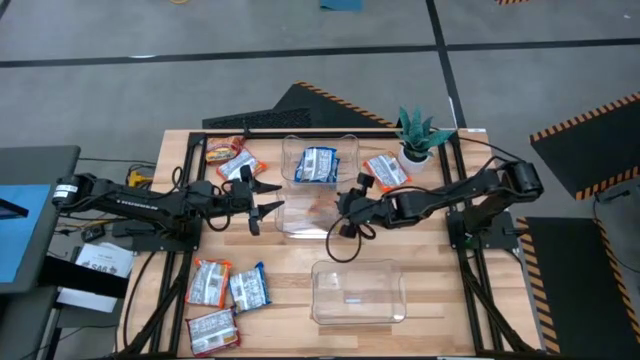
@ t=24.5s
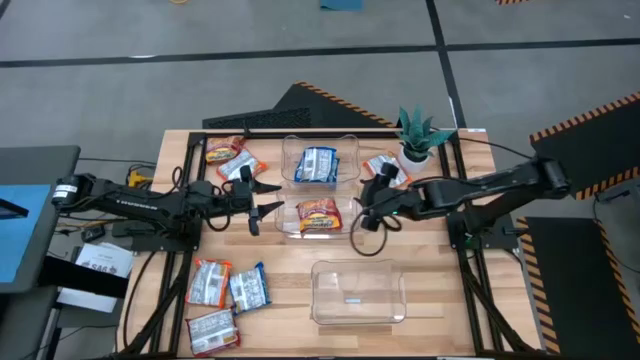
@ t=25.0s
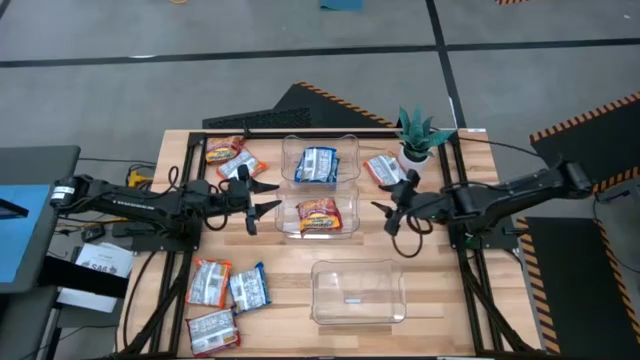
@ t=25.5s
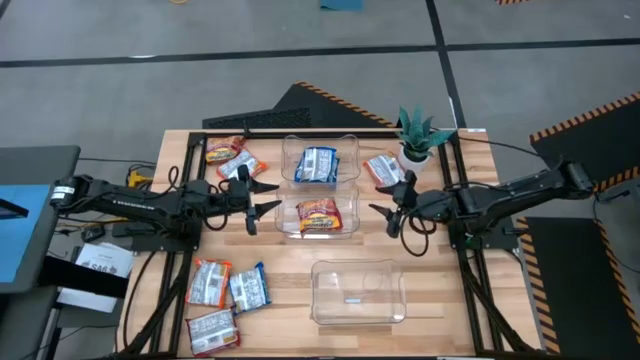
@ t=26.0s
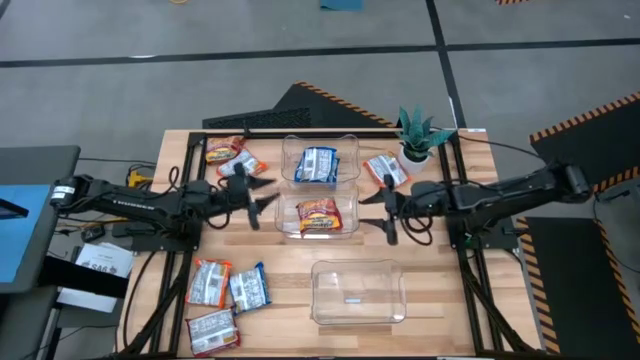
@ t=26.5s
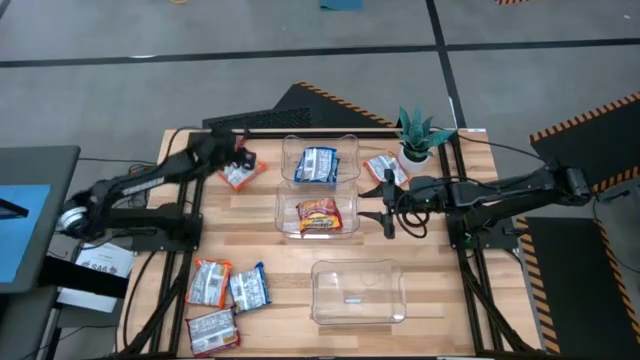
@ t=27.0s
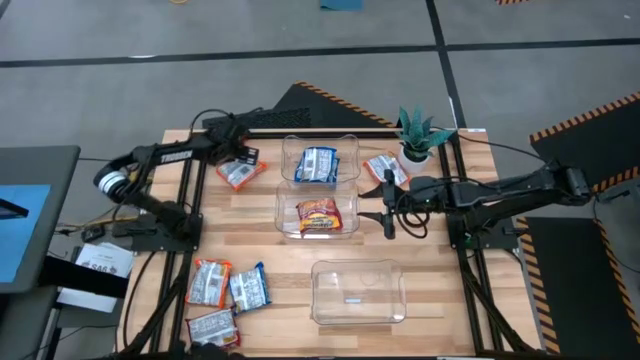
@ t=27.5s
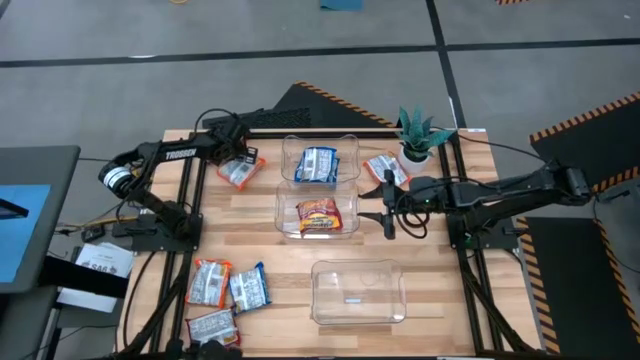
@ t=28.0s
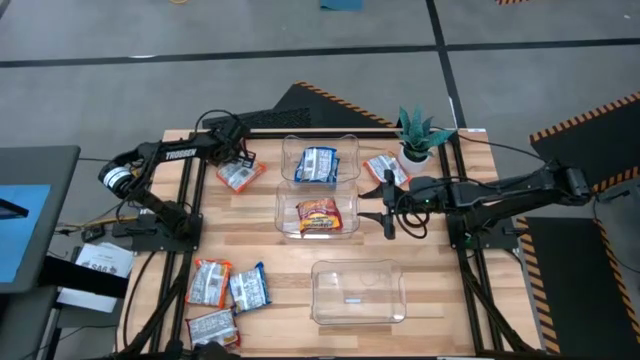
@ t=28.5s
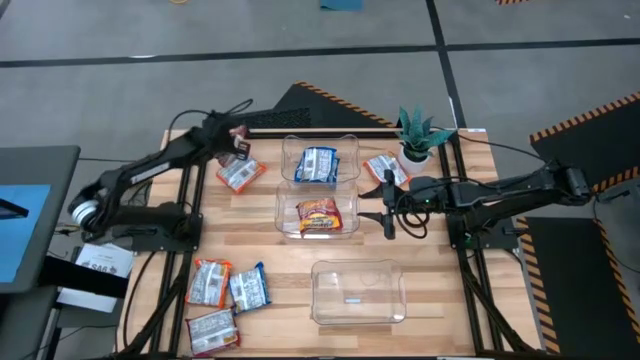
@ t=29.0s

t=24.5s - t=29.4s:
Task: Sort Maruchan noodles
Put the top red noodle pack into the middle transparent bin

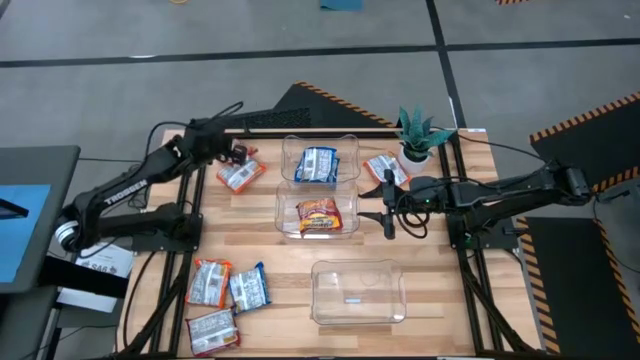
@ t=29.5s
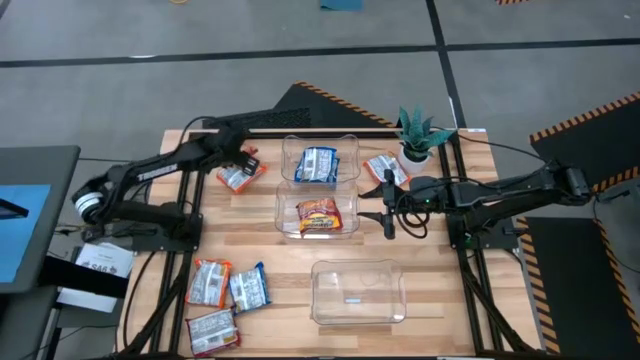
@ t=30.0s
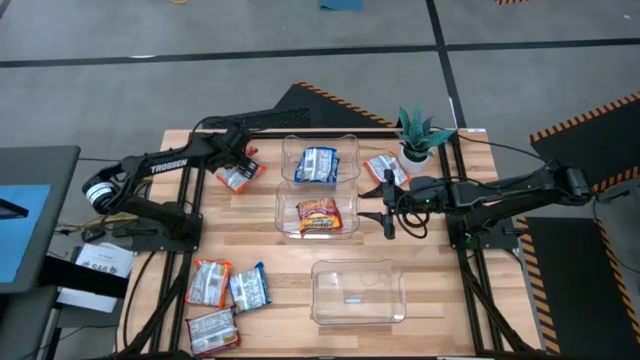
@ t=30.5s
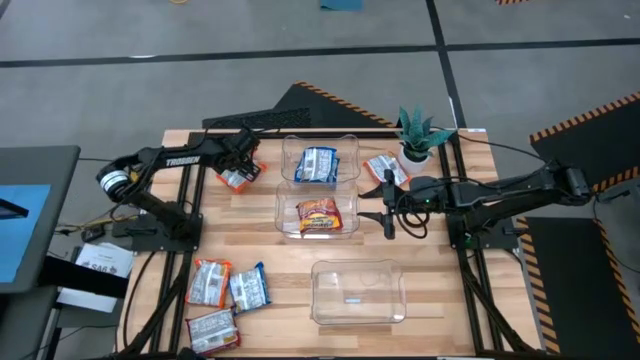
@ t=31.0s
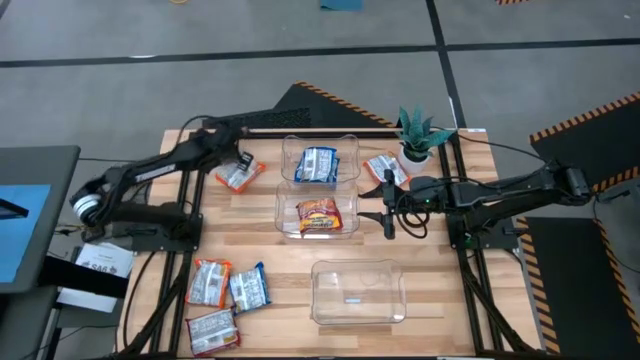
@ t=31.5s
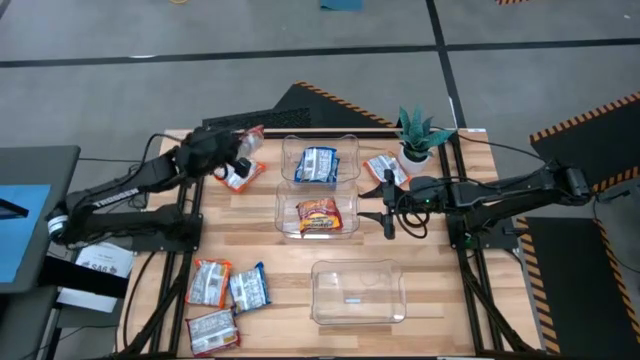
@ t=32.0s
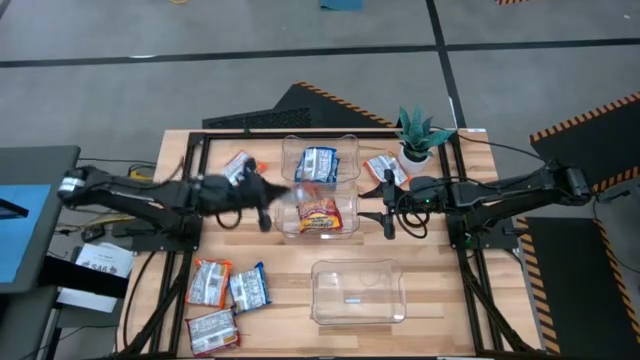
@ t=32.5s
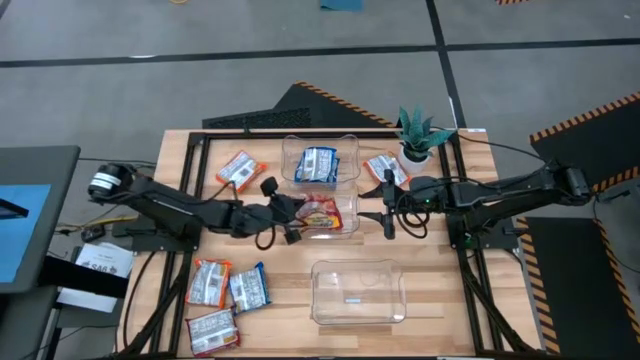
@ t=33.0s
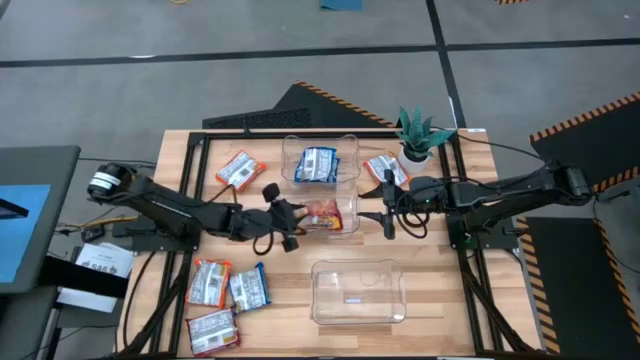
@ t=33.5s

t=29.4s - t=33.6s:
Put the top red noodle pack into the middle transparent bin

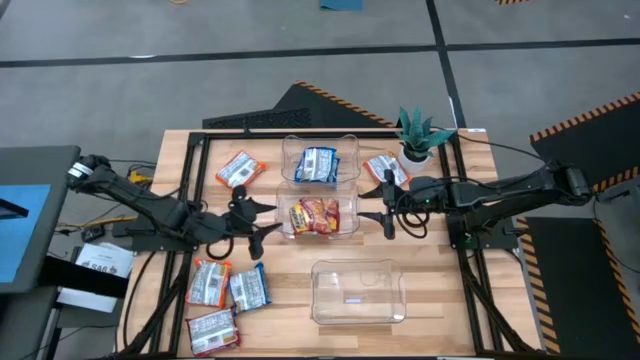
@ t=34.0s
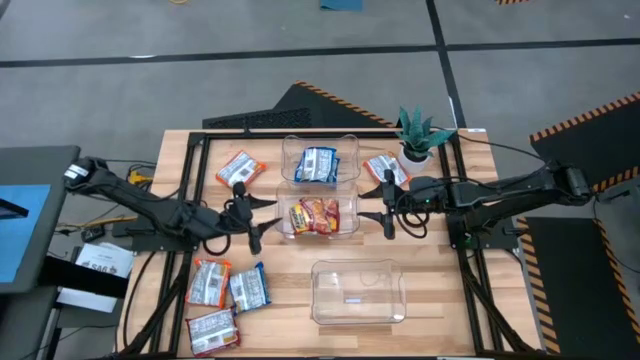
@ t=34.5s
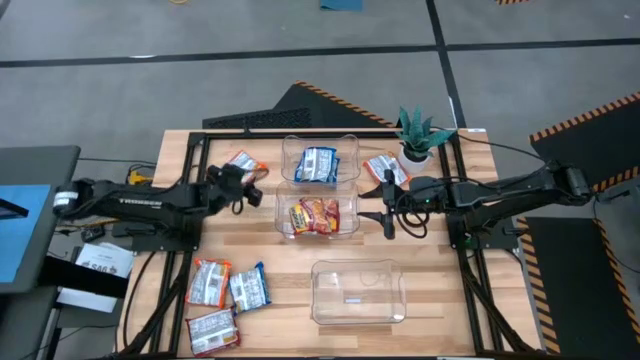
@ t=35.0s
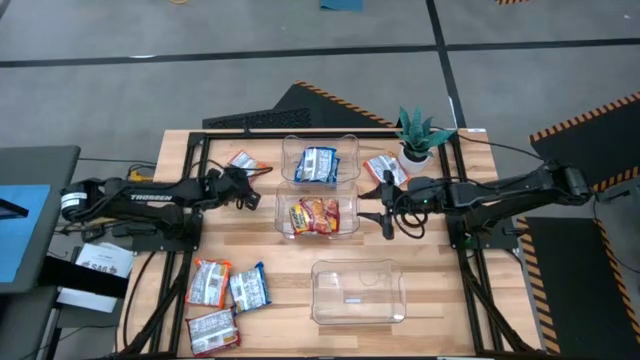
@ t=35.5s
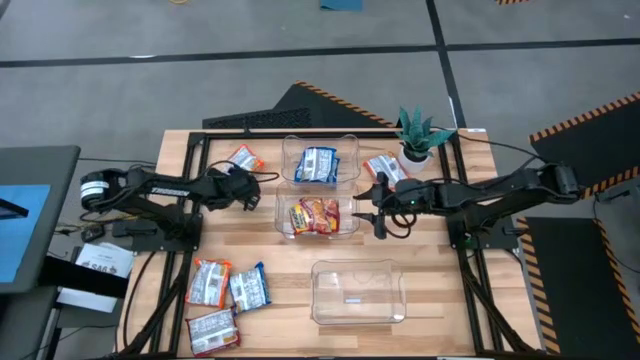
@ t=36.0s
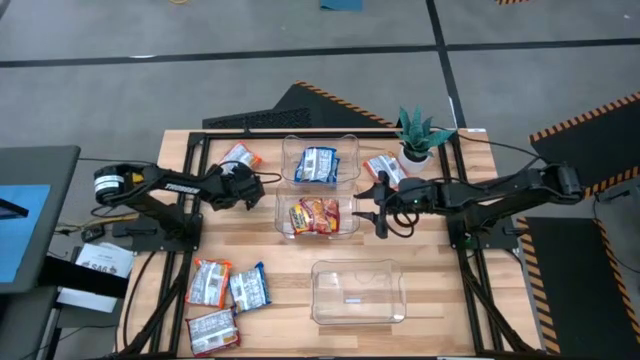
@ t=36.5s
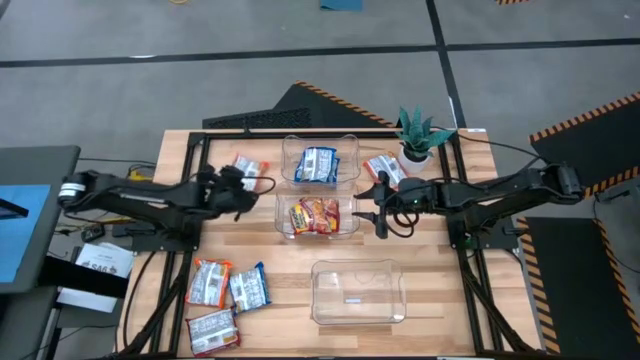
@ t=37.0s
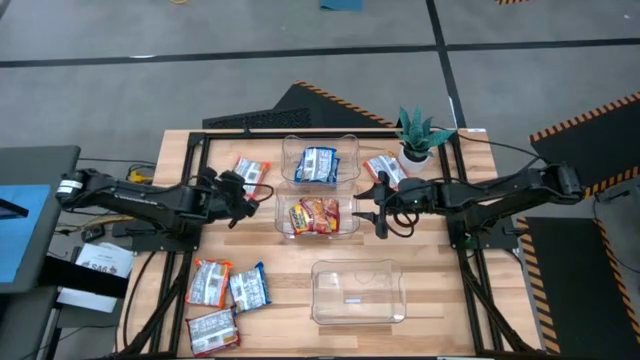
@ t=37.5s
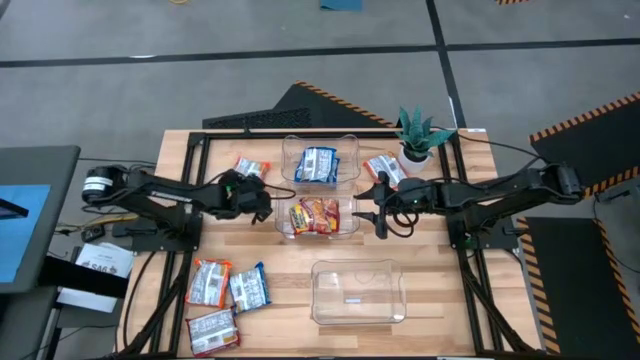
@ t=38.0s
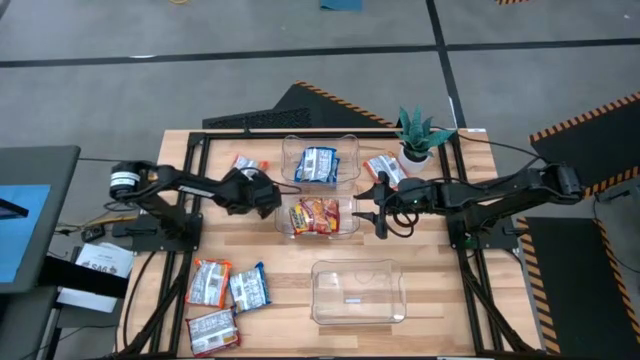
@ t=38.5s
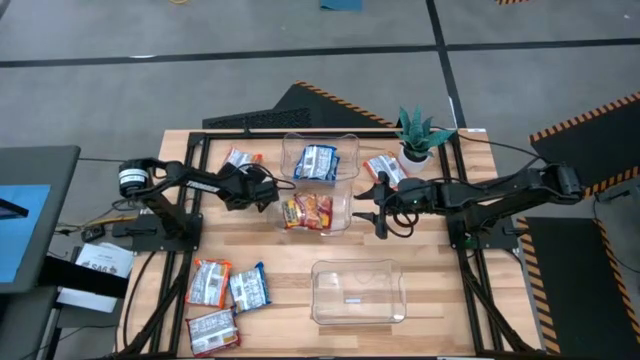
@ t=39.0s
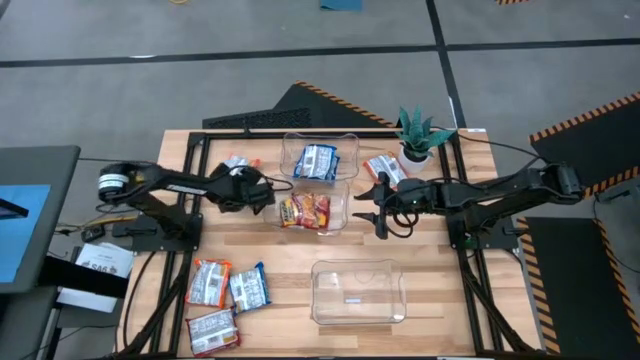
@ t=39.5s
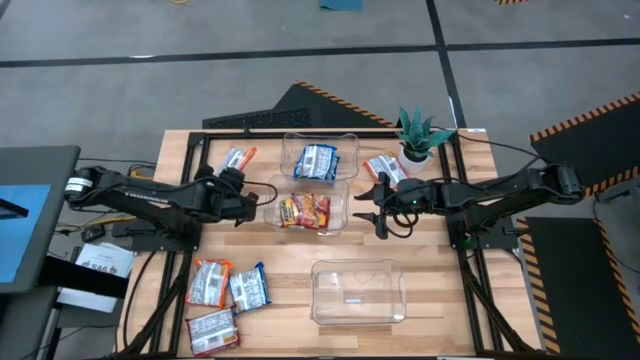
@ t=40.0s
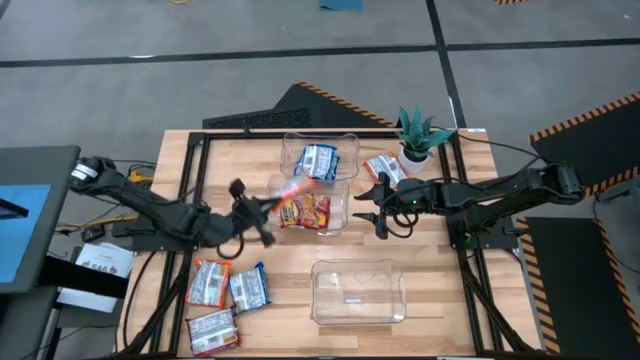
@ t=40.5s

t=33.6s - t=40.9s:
Put the top left orange noodle pack into the bottom transparent bin

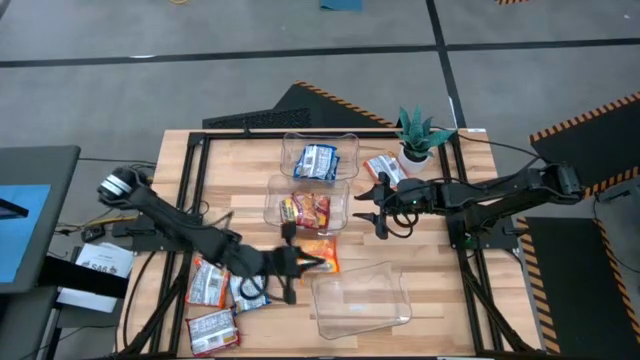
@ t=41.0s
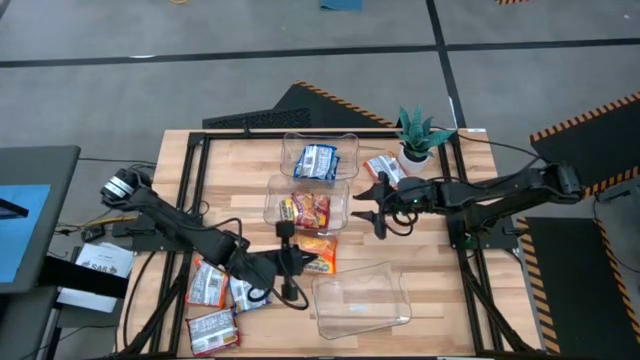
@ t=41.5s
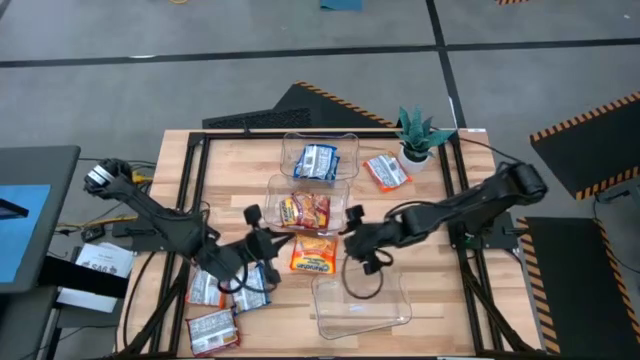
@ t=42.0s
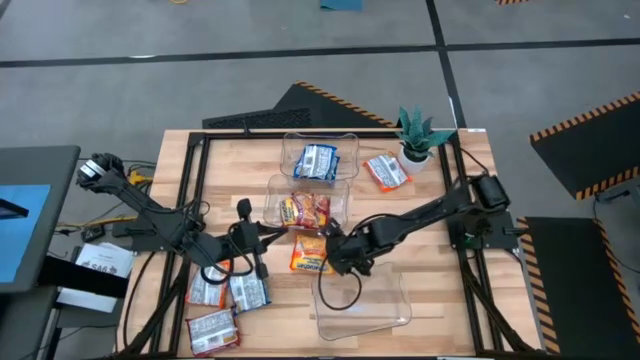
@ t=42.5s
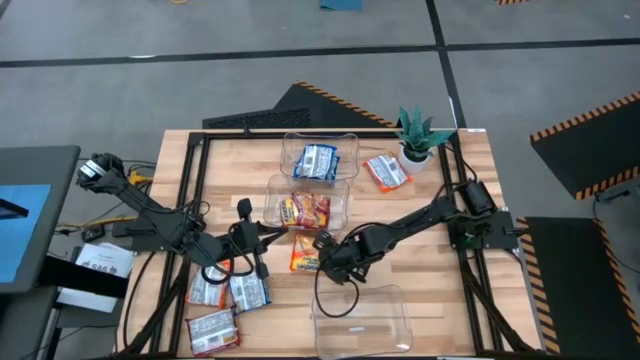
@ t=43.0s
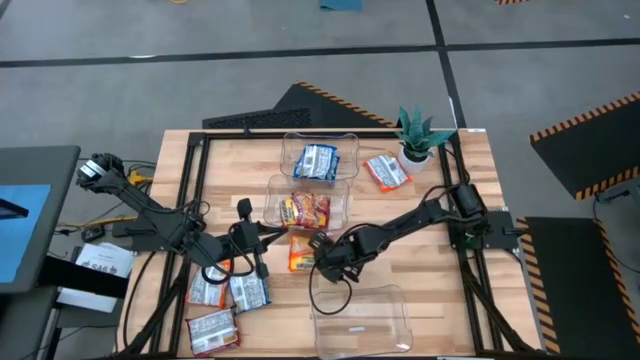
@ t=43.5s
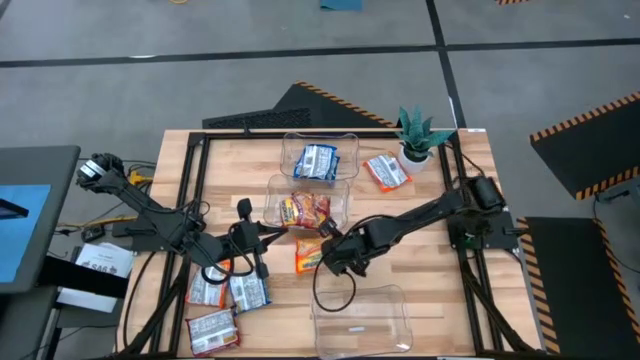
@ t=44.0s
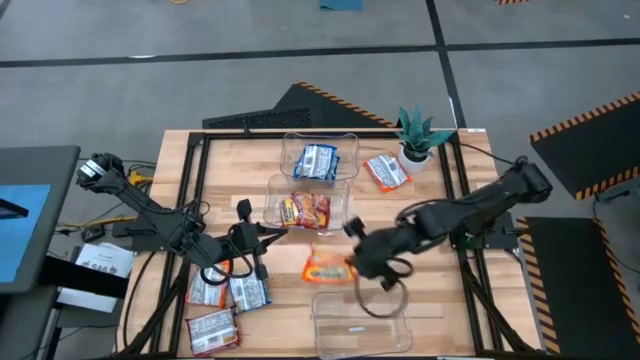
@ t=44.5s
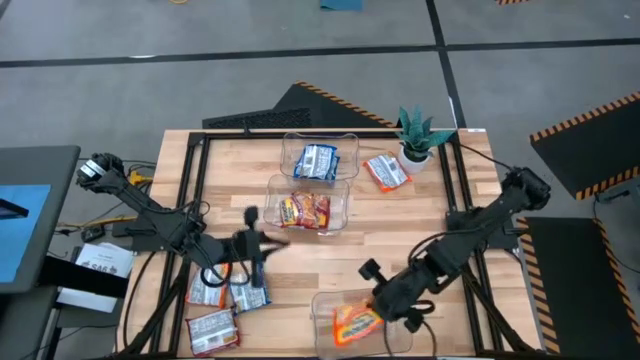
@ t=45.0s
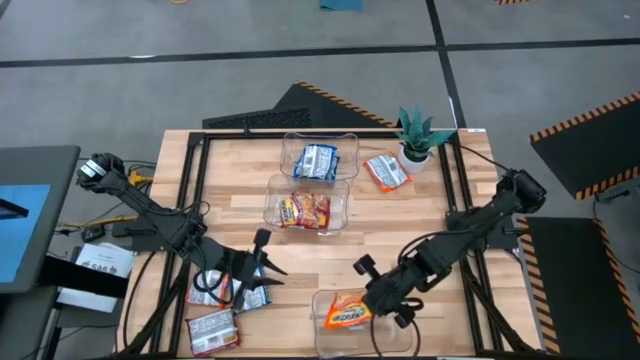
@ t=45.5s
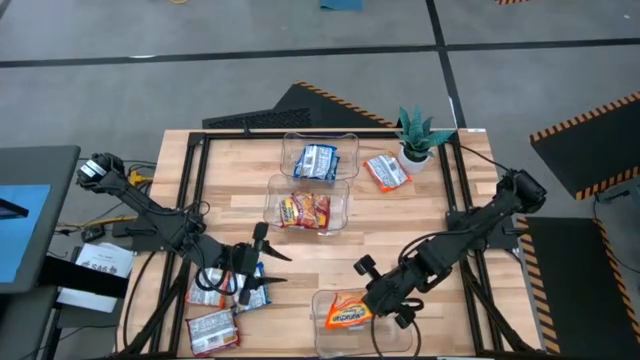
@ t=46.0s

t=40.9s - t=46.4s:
Put the top left orange noodle pack into the bottom transparent bin
